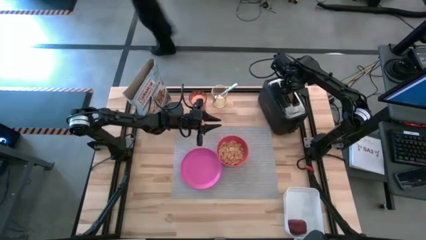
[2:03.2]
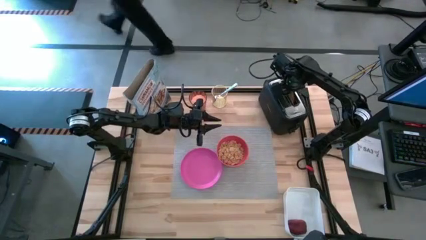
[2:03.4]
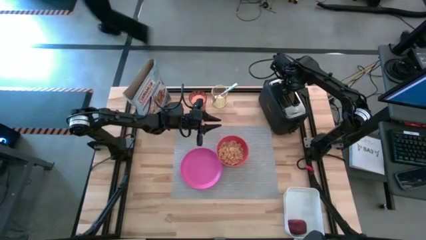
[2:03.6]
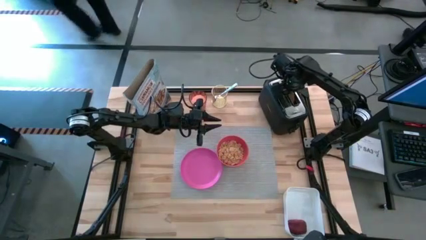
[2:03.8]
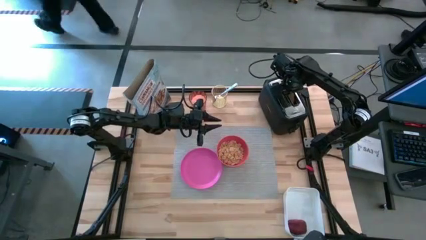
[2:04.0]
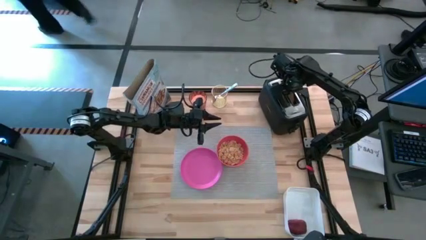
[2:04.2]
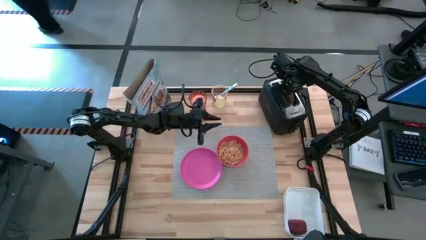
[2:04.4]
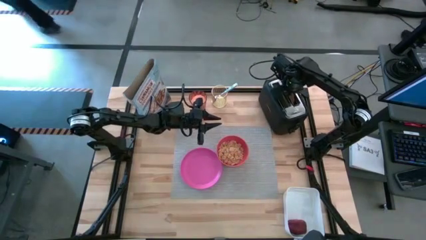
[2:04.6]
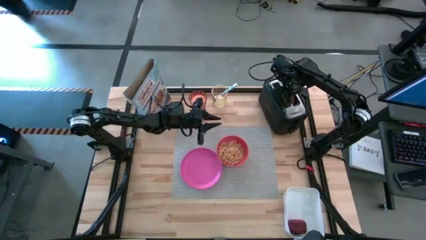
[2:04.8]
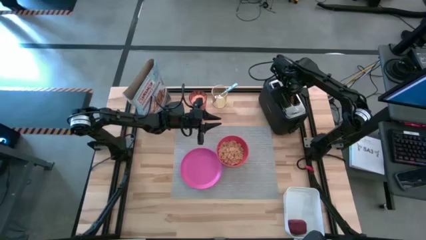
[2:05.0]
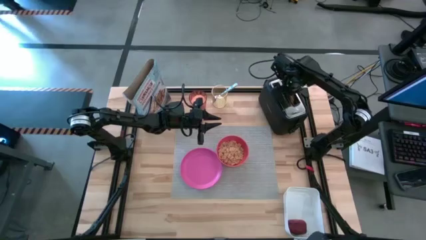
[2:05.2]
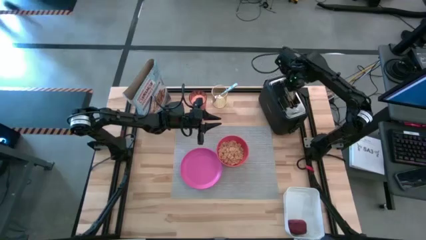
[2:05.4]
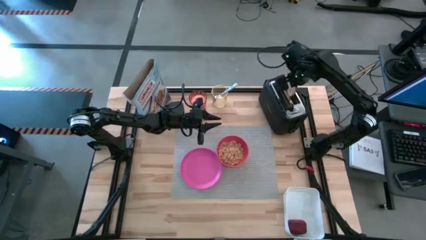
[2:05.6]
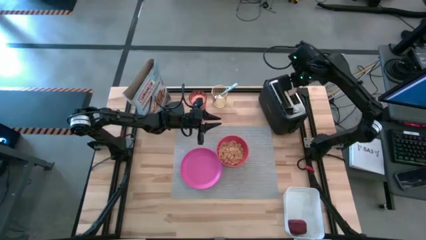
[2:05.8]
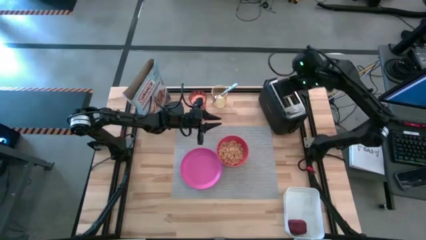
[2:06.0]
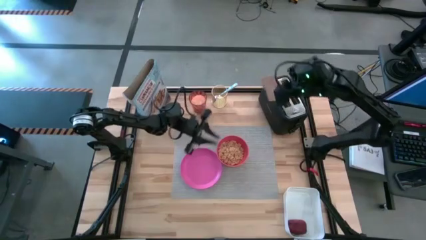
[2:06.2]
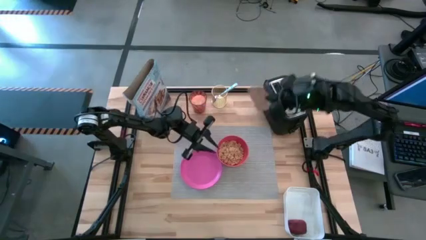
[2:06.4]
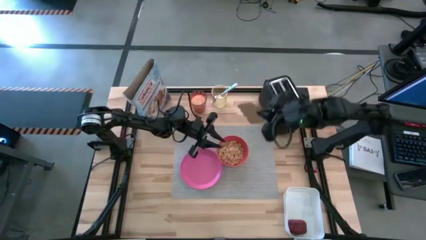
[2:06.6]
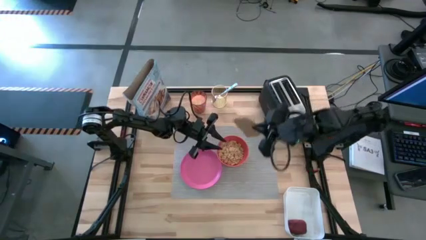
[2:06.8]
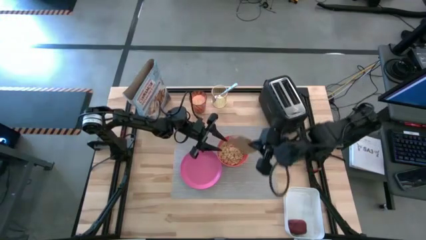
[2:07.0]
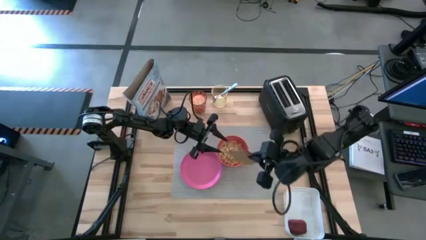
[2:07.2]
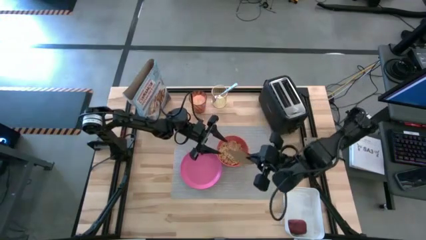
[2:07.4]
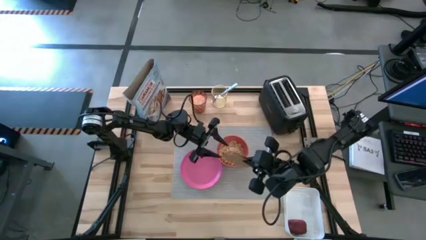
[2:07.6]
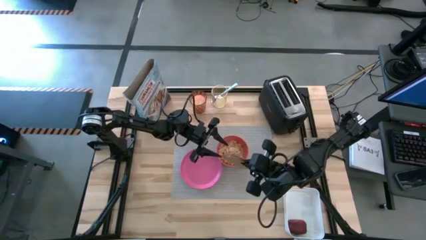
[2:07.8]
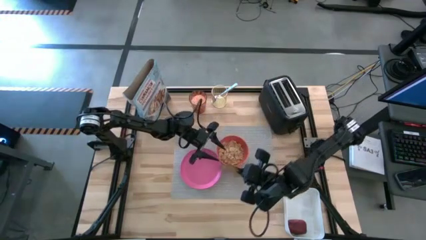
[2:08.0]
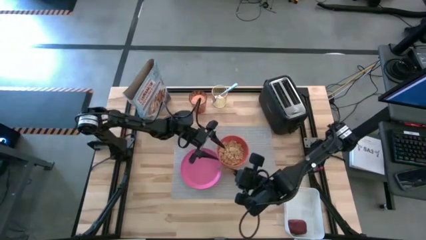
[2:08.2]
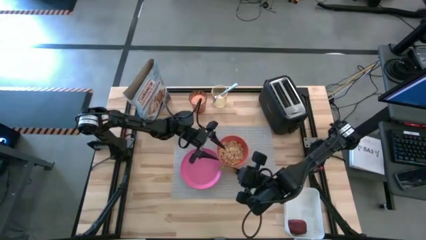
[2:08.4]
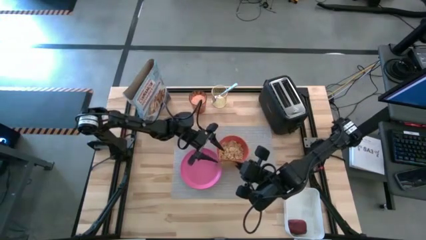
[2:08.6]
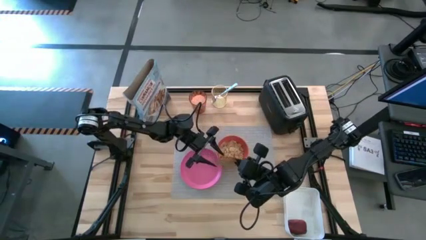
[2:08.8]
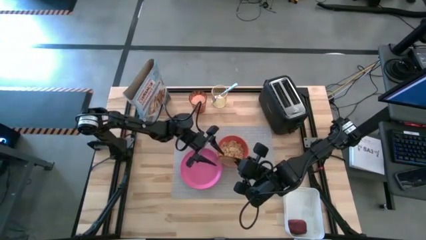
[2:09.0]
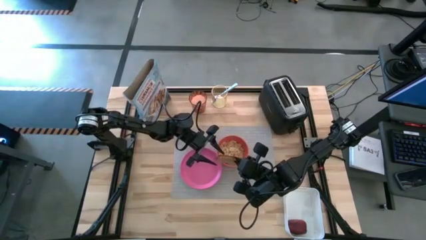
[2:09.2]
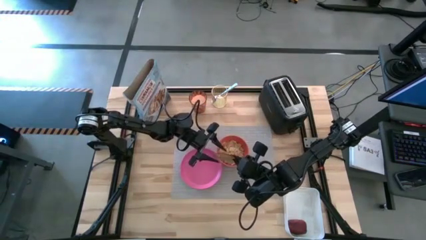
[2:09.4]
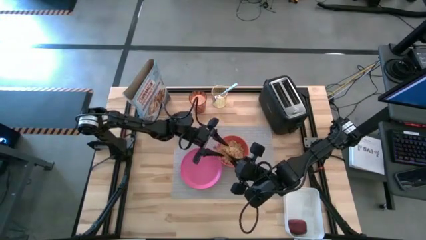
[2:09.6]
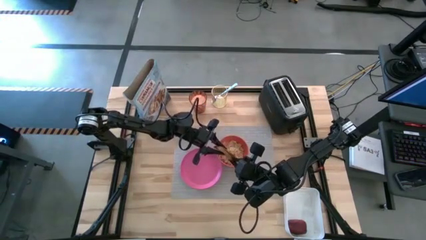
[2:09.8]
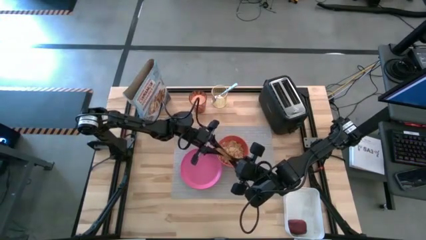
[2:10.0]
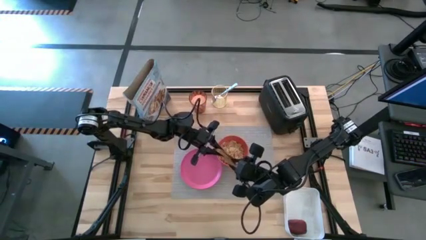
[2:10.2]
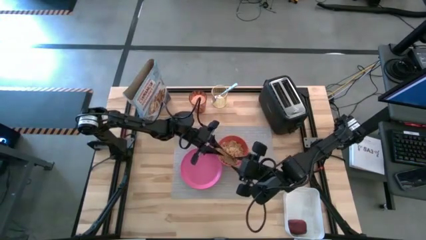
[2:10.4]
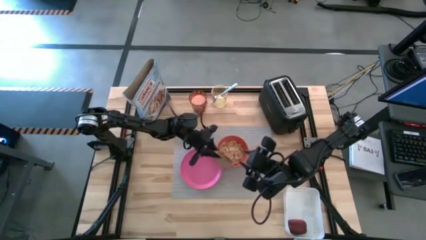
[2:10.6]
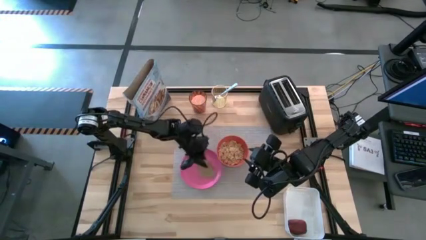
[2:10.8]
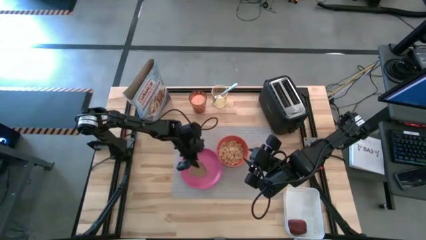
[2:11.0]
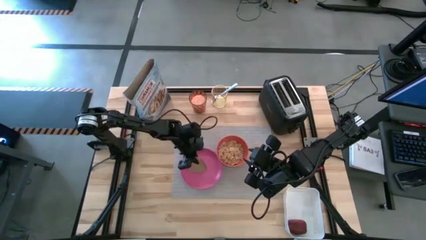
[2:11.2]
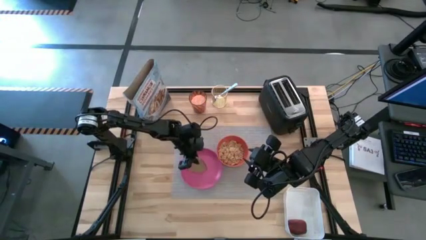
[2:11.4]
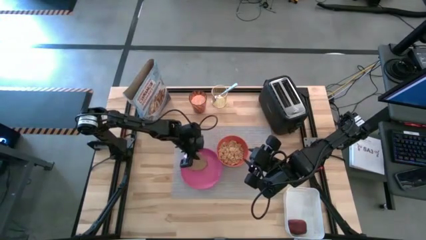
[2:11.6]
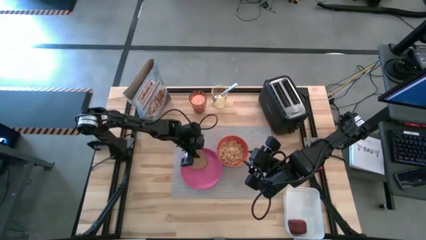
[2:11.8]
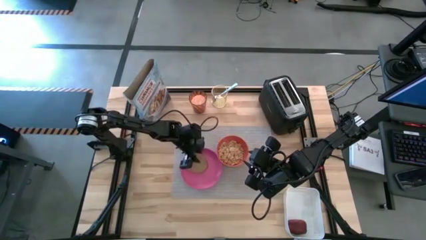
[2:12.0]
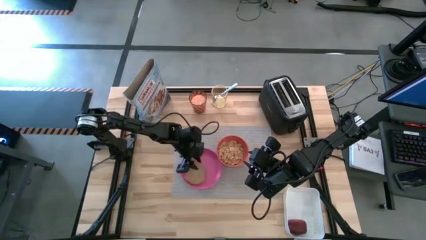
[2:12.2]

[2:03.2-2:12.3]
Task: Arrange a breakfast setting
Put the bread on the pink plate

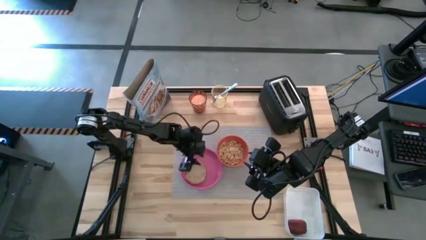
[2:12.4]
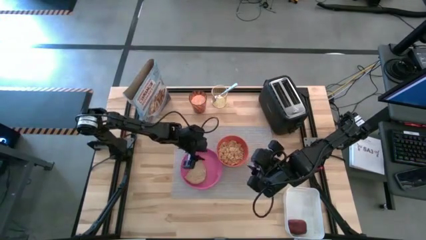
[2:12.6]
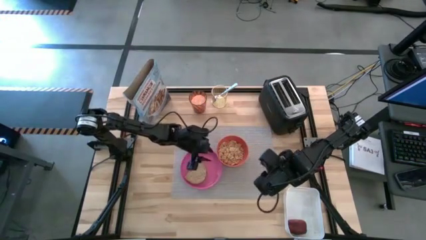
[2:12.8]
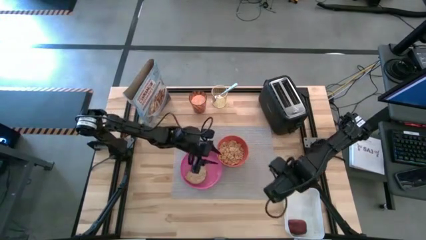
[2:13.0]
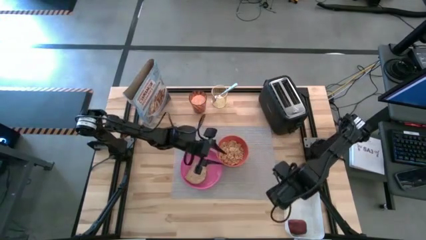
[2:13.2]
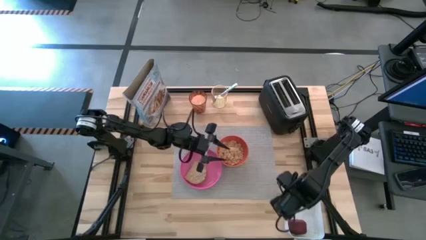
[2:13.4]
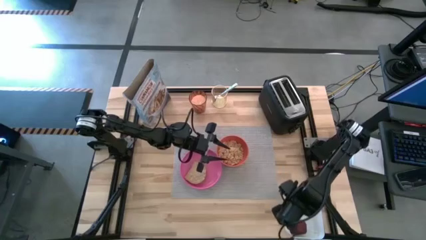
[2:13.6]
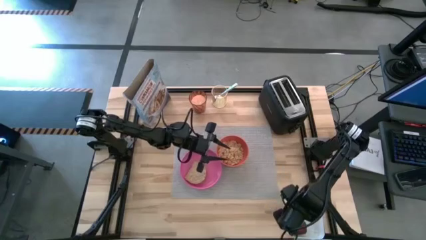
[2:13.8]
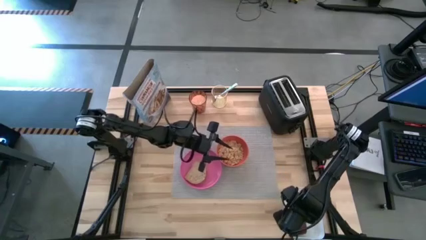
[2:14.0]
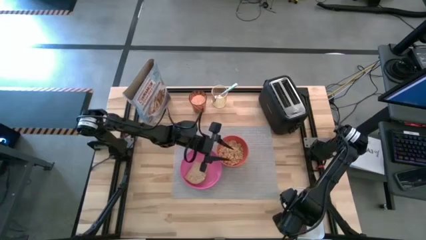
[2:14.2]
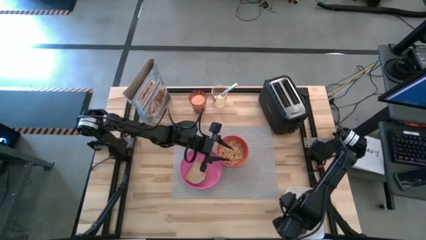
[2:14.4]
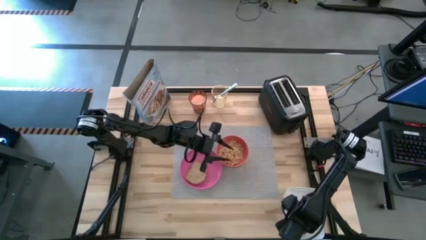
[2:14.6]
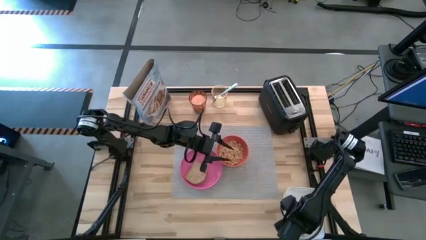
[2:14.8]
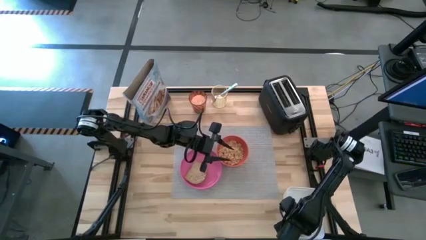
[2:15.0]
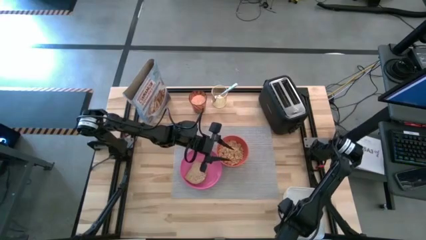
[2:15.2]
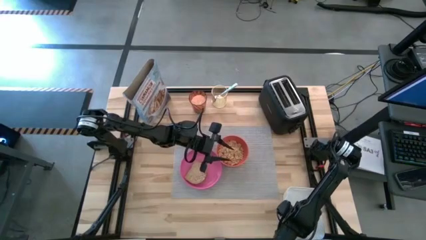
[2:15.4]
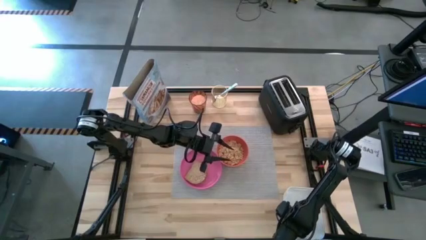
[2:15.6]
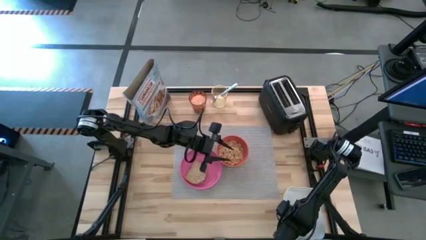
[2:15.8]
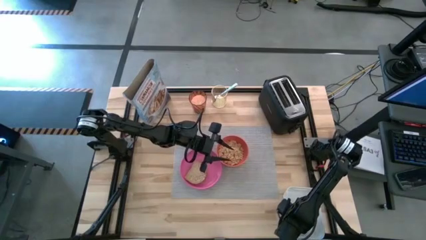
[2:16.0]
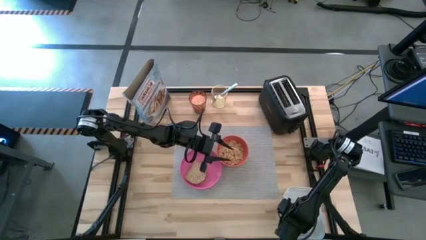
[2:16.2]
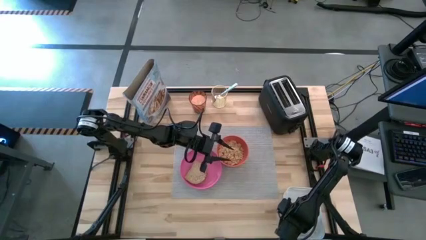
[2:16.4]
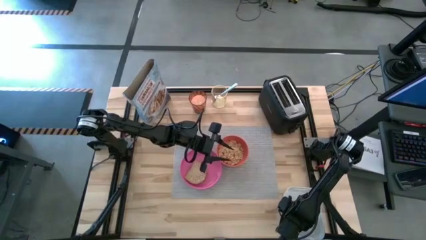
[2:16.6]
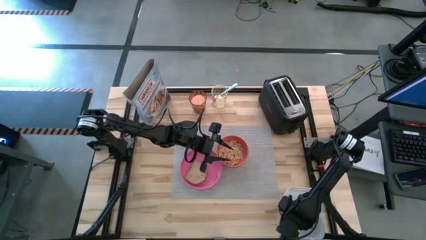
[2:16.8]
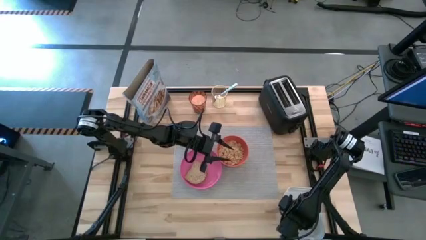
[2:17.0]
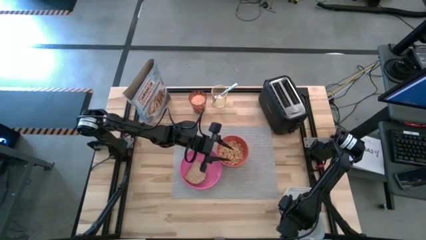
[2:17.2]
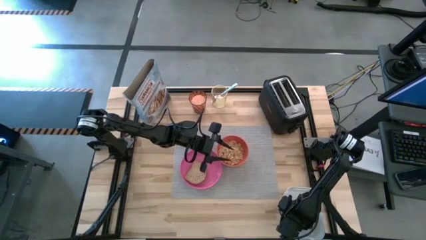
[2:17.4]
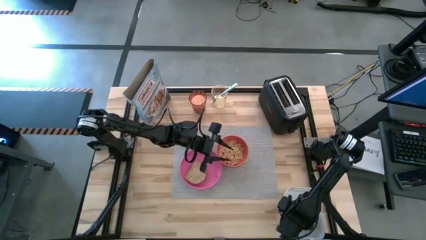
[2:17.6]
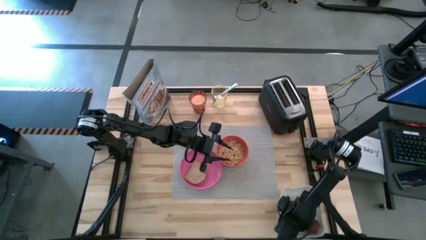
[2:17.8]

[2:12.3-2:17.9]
Put the apple on the gray table mat to the bottom of the orange bowl
